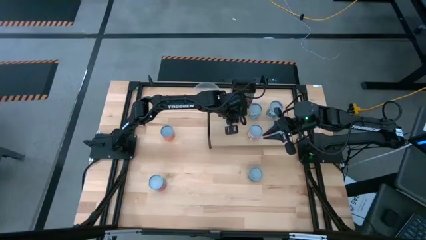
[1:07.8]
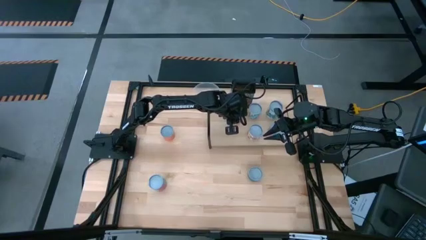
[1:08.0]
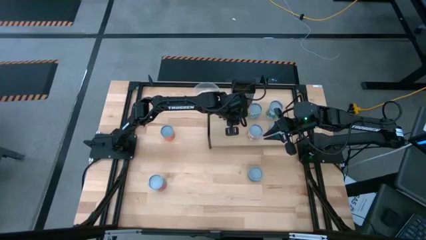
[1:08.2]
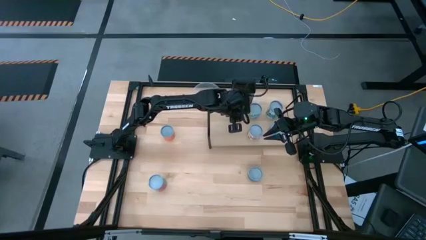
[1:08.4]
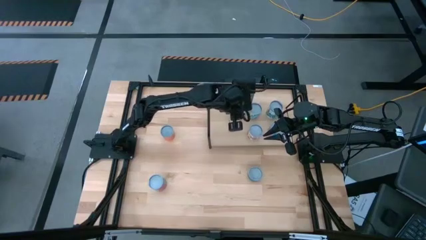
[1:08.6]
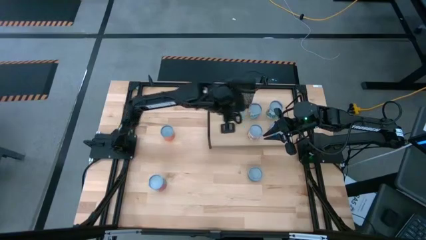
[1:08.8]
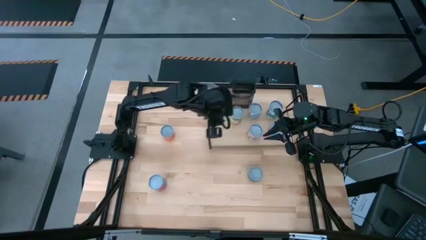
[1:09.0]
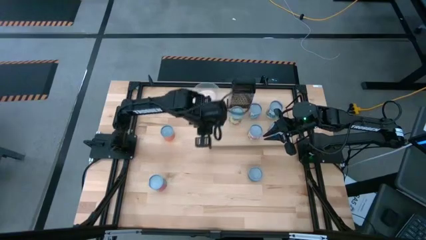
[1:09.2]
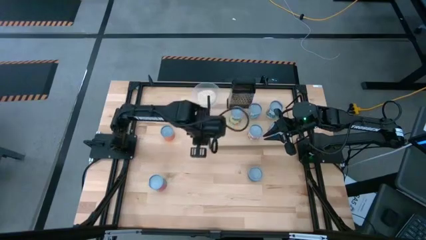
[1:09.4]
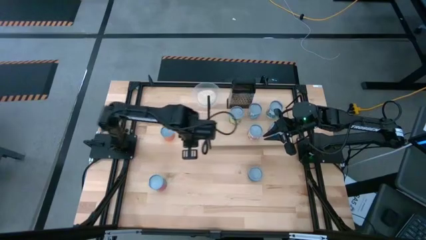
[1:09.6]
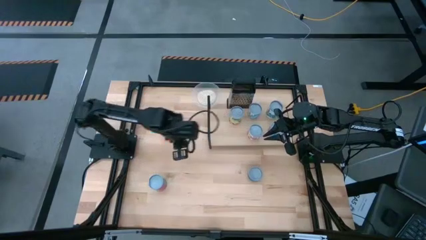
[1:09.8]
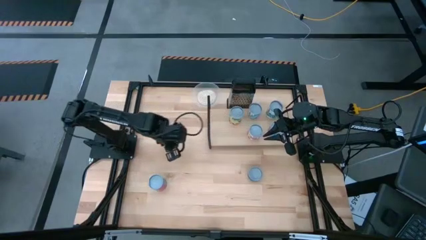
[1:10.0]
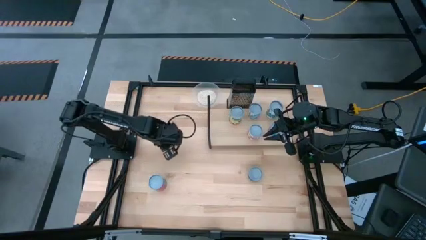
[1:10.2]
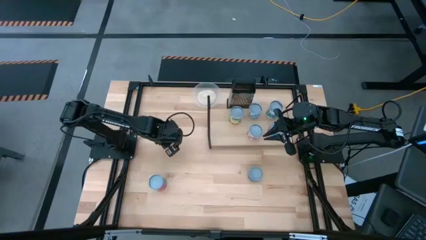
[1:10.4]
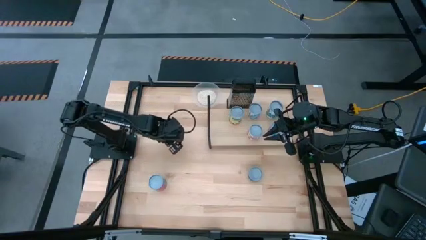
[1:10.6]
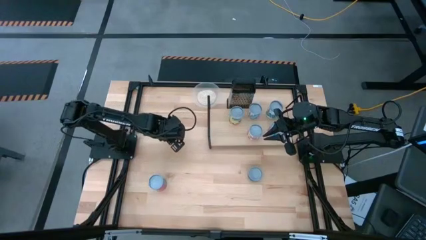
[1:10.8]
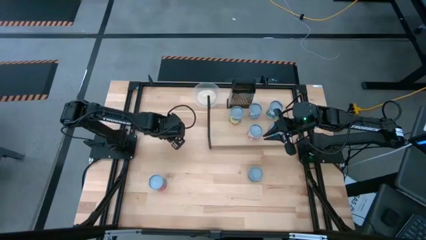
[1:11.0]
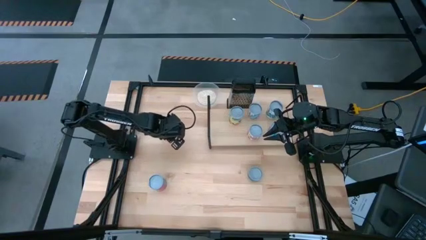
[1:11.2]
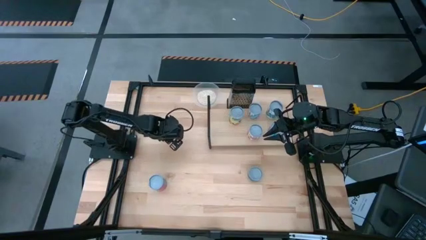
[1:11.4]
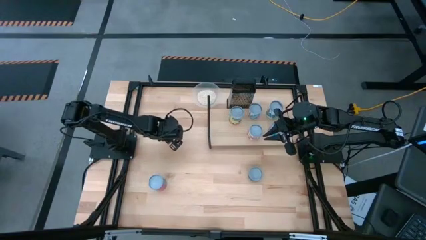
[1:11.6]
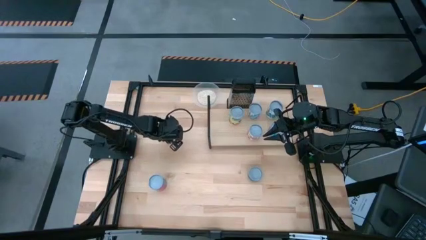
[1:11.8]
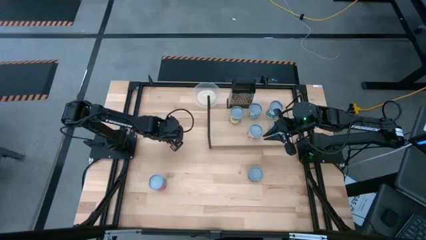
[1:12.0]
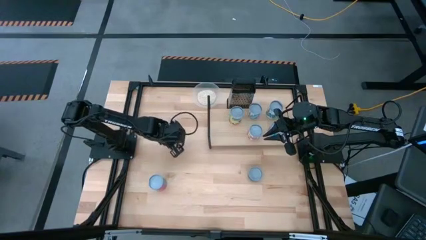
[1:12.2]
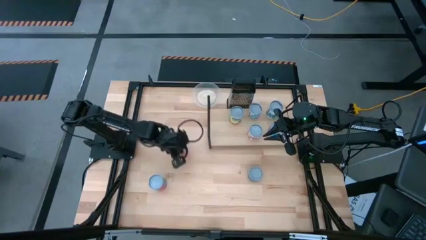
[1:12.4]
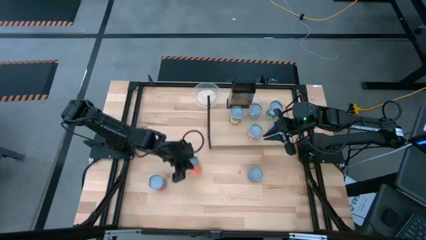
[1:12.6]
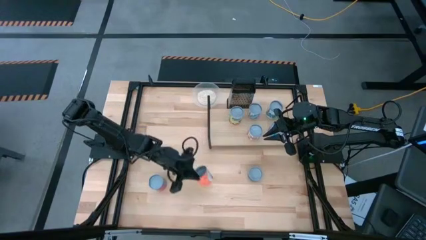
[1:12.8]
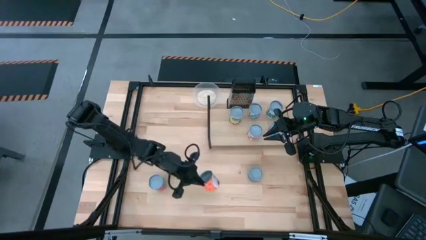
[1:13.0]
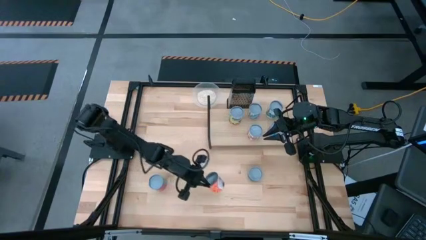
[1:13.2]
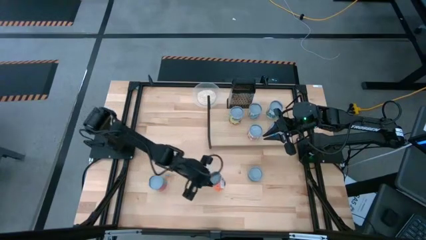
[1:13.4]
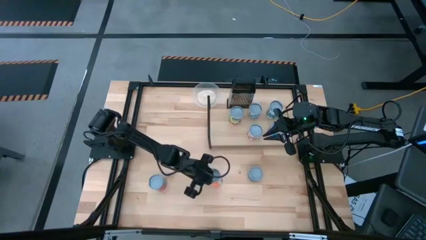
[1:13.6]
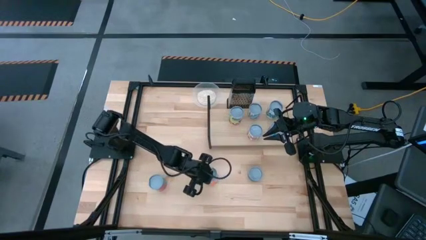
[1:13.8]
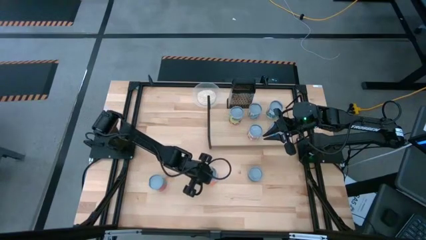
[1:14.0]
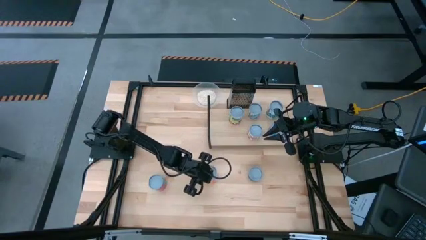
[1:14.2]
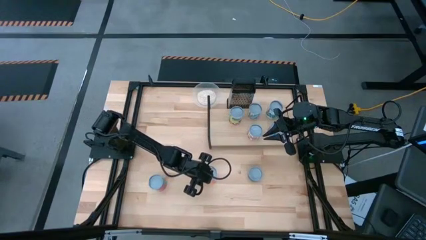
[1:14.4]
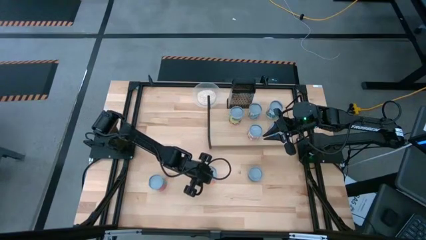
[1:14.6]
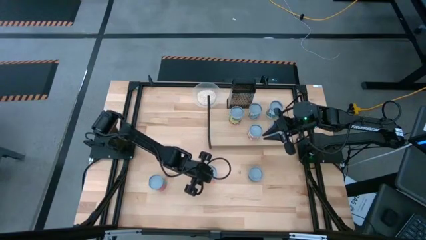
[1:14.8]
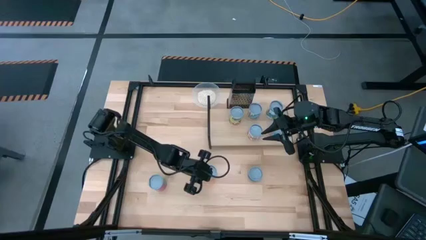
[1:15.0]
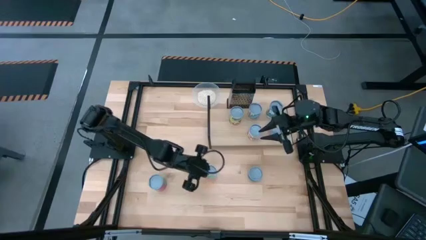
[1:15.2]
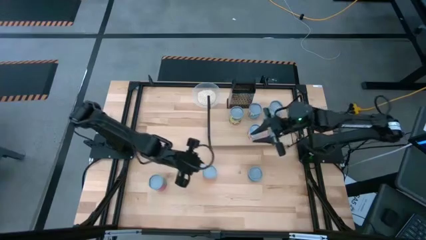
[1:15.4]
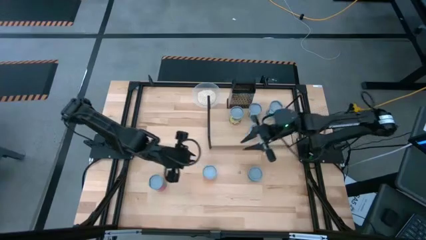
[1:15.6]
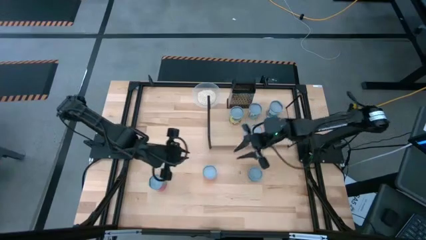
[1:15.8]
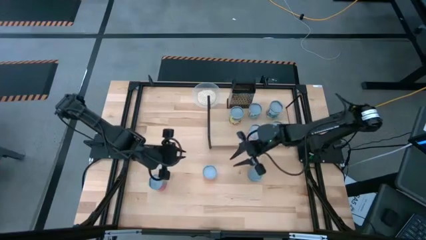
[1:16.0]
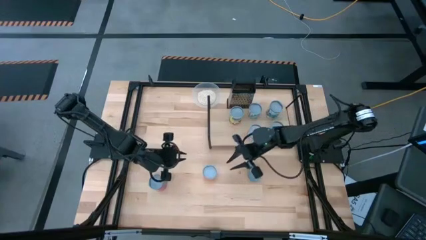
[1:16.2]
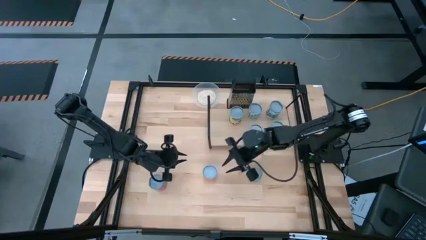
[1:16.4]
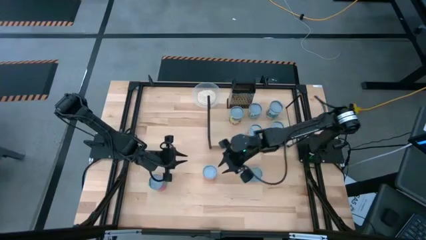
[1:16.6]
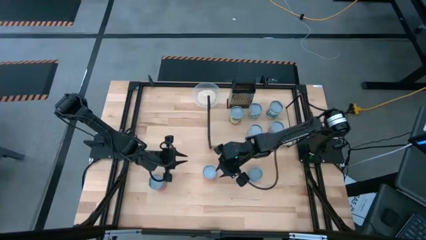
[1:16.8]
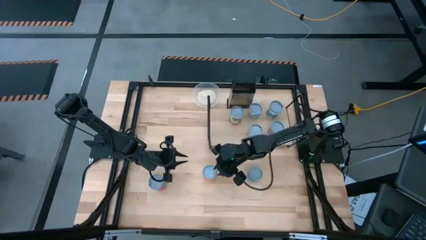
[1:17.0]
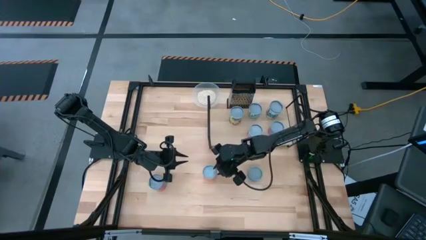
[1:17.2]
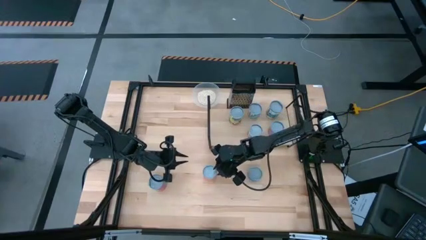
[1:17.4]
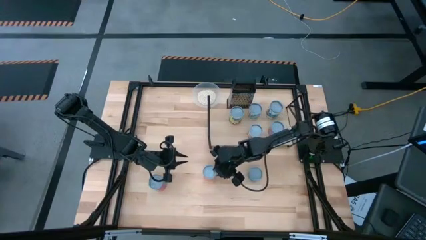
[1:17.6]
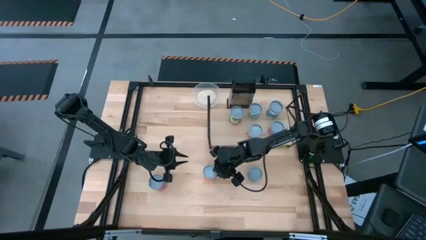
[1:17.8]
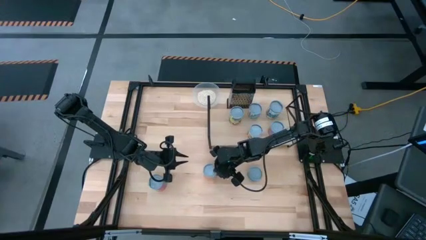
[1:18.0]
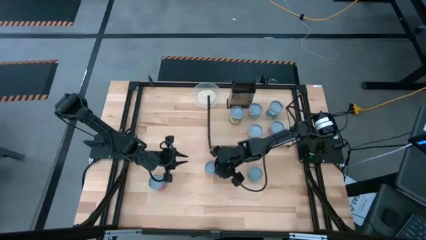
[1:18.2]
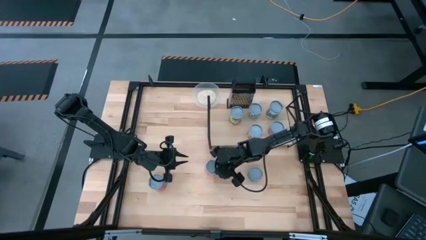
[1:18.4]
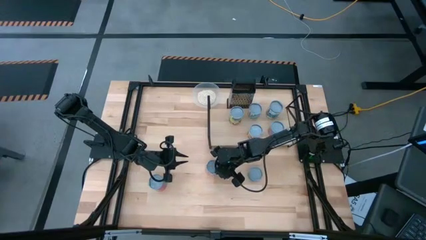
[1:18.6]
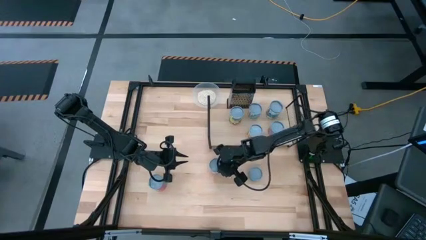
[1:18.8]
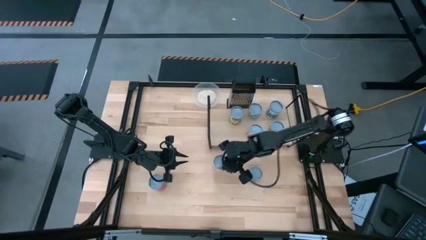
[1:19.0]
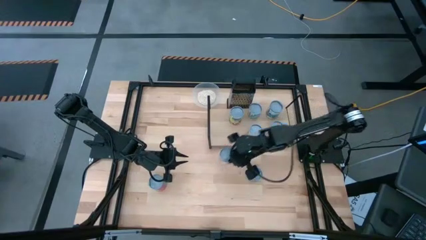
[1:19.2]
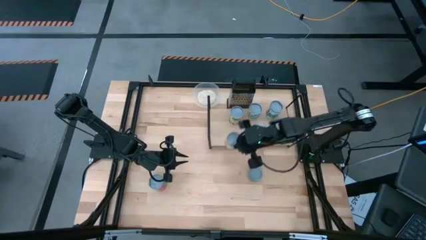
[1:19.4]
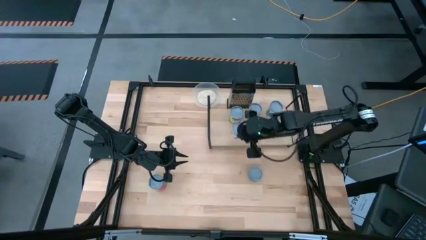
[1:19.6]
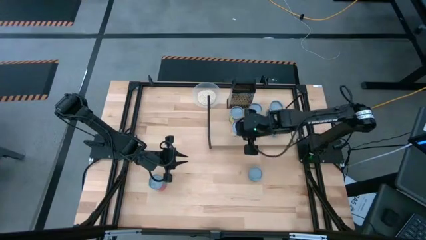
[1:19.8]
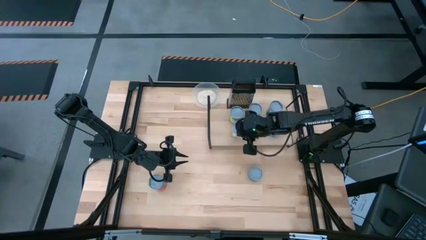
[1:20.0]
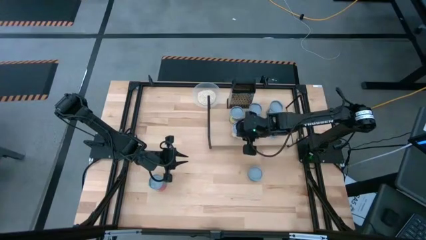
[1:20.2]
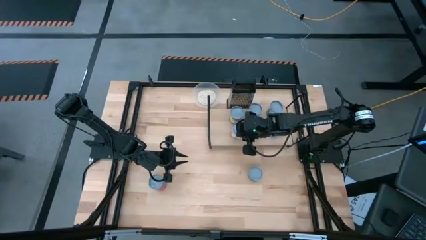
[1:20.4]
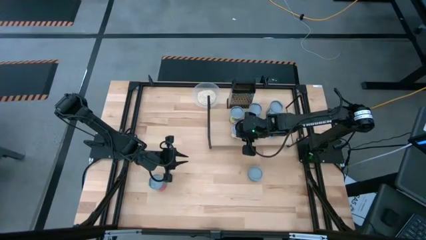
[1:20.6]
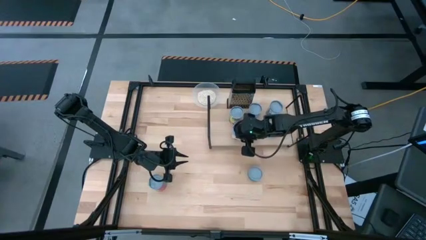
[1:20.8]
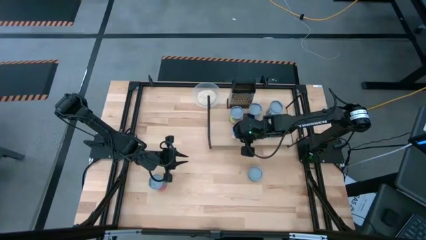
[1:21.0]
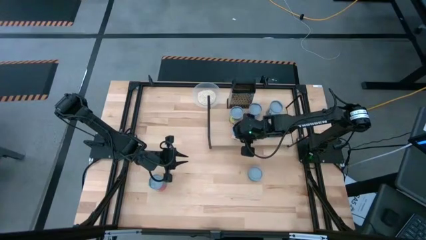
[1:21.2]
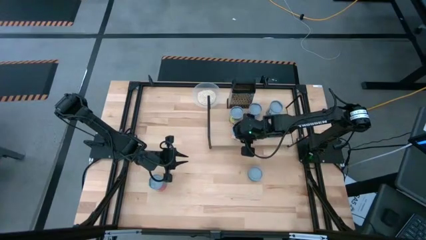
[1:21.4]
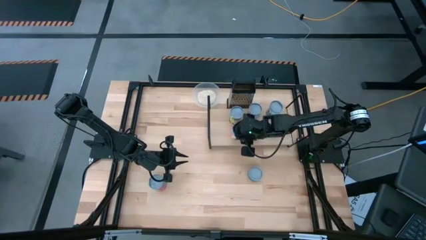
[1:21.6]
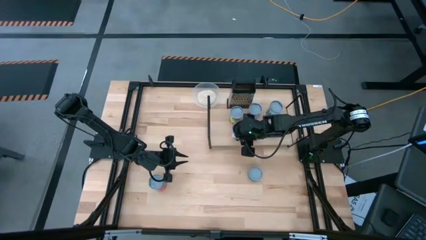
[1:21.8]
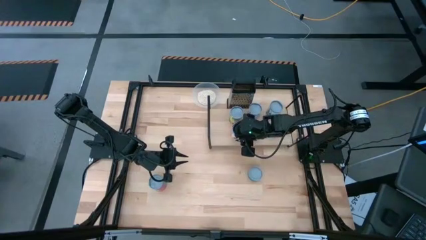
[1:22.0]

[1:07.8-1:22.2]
Task: Pick and place cans onto a shelf
Put the canned meatballs on the shelf
